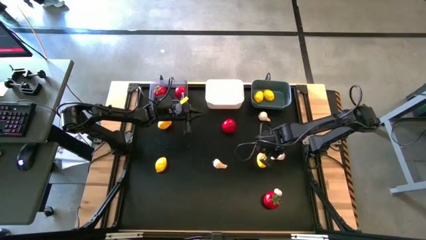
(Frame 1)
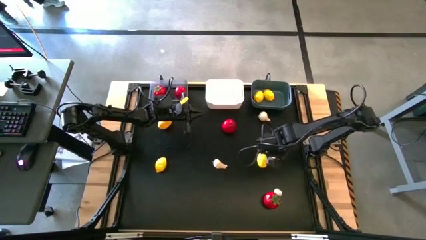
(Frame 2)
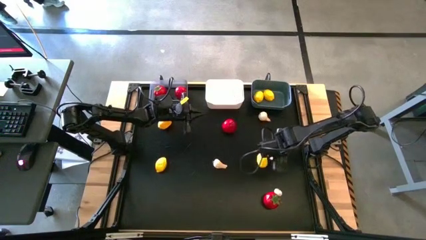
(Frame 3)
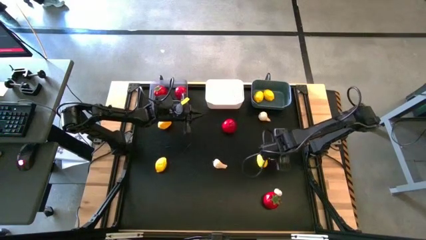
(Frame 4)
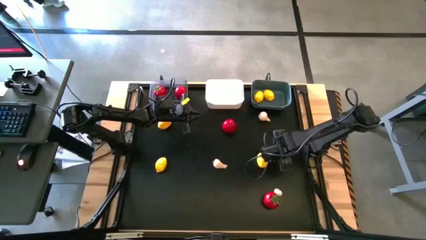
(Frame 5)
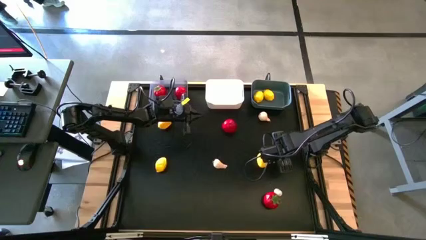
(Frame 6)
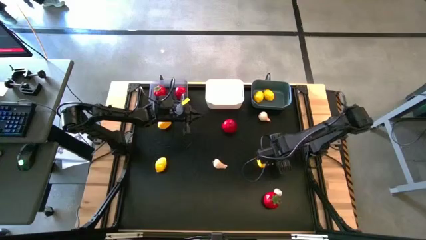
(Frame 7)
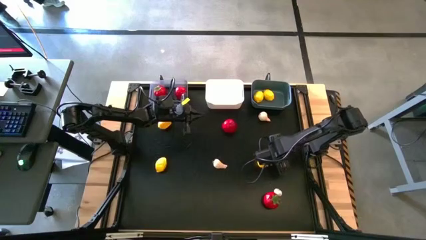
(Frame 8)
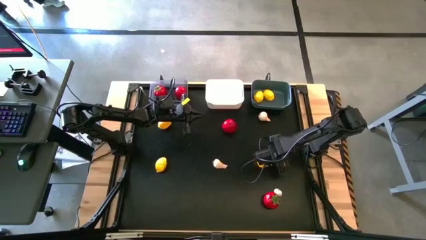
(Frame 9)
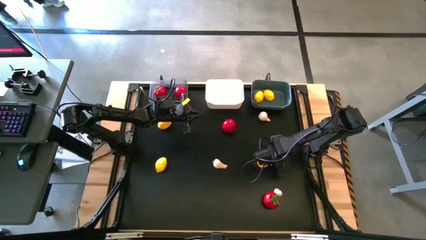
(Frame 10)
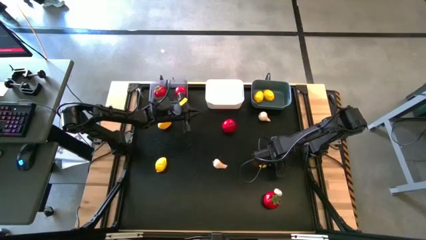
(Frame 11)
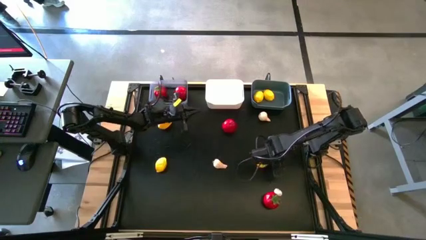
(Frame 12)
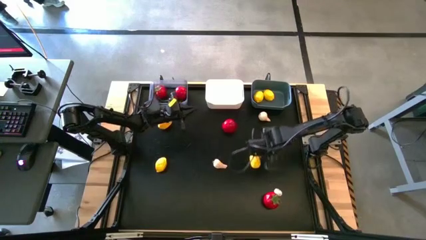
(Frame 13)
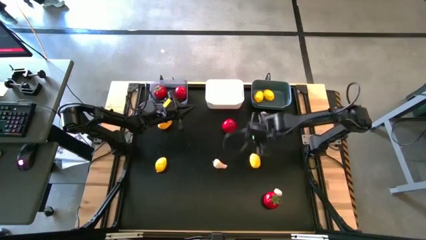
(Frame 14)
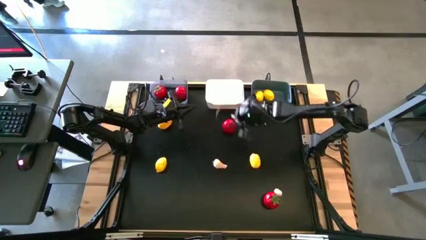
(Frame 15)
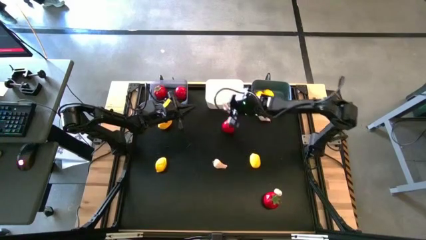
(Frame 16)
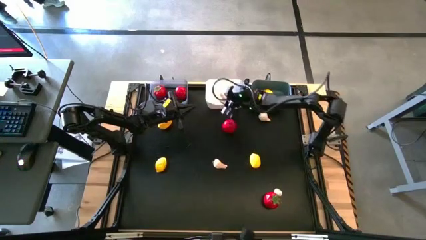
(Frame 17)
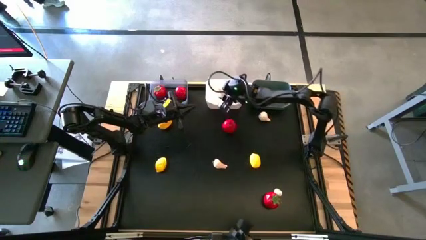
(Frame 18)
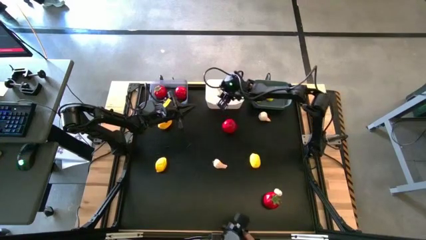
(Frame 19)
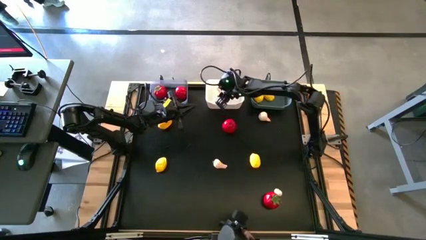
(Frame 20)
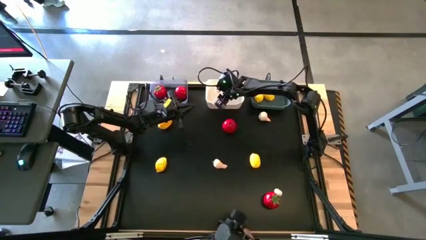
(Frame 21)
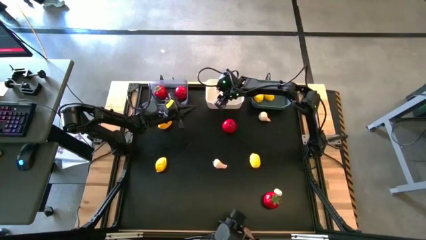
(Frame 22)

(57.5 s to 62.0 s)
Task: Sort produce into baskets
Put the garlic into the white bin

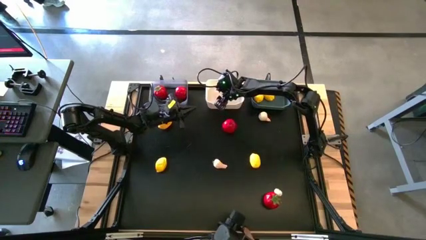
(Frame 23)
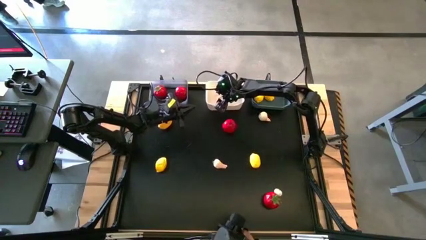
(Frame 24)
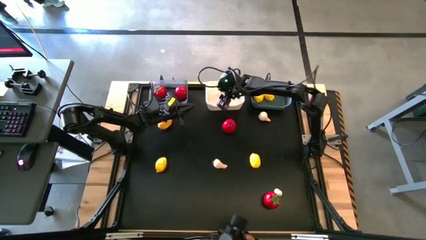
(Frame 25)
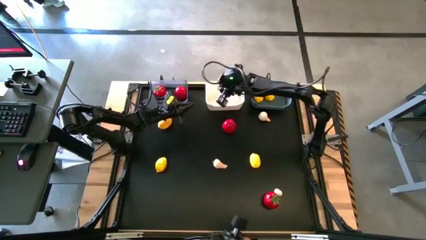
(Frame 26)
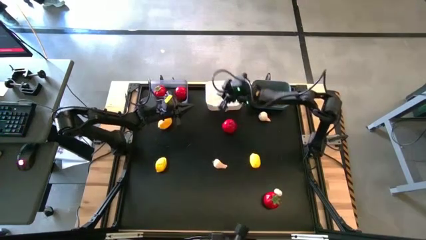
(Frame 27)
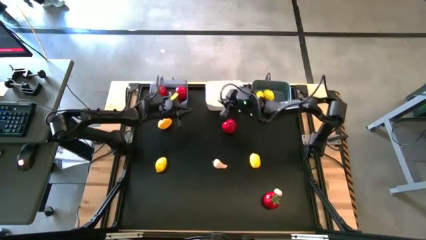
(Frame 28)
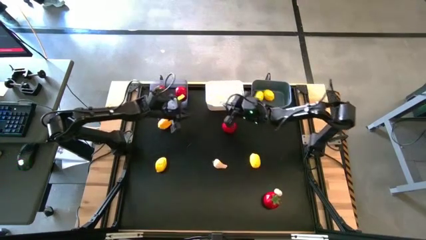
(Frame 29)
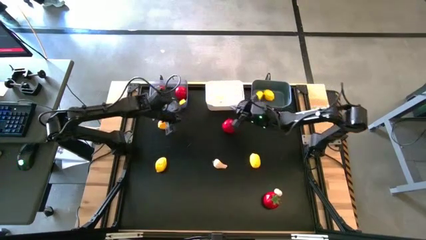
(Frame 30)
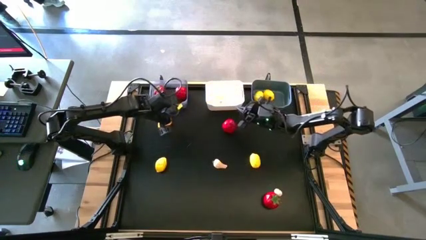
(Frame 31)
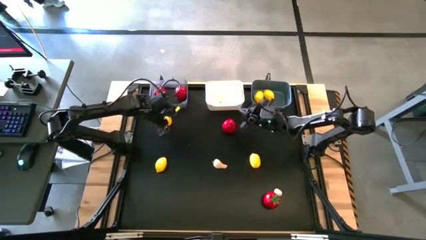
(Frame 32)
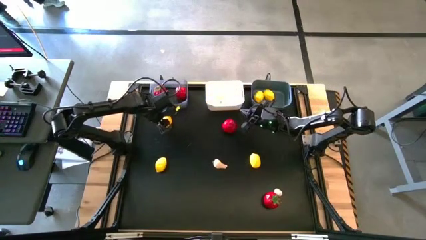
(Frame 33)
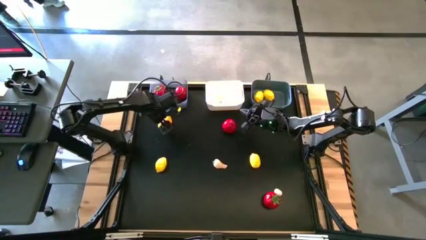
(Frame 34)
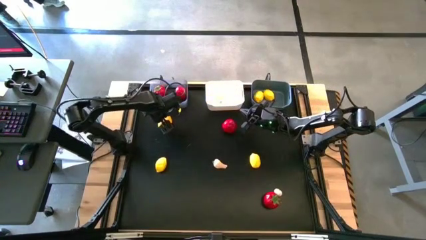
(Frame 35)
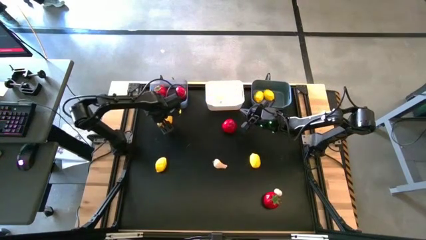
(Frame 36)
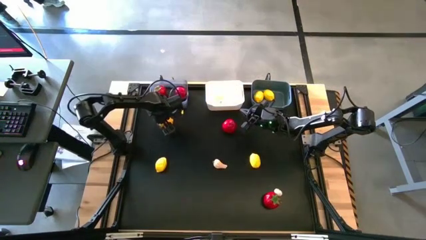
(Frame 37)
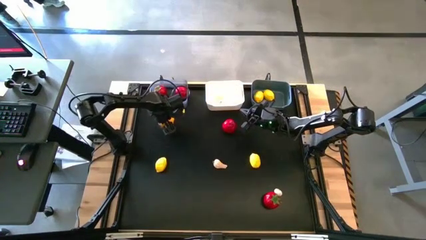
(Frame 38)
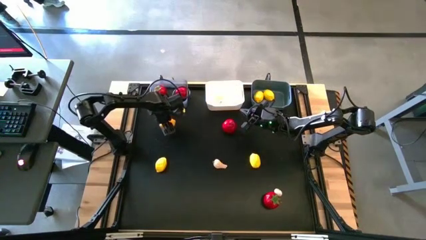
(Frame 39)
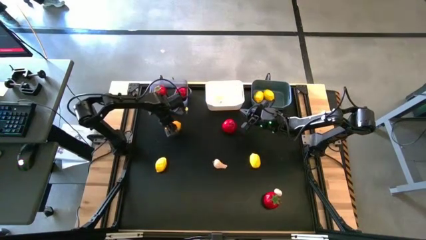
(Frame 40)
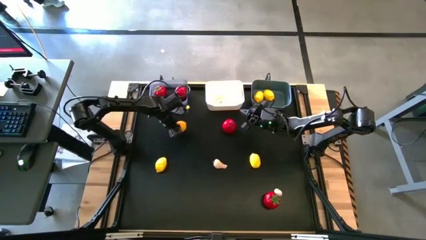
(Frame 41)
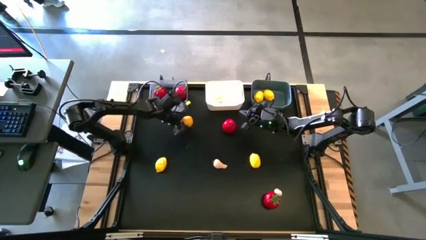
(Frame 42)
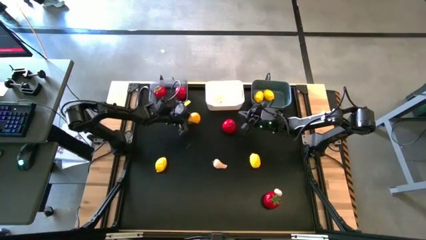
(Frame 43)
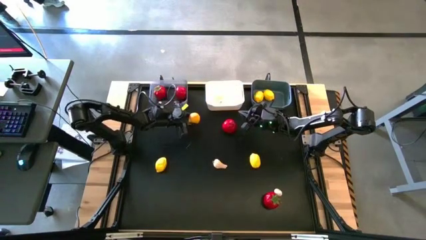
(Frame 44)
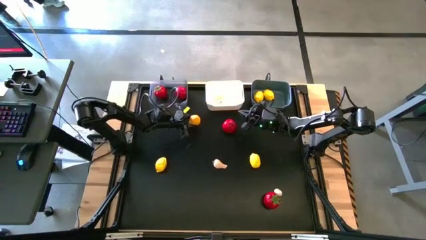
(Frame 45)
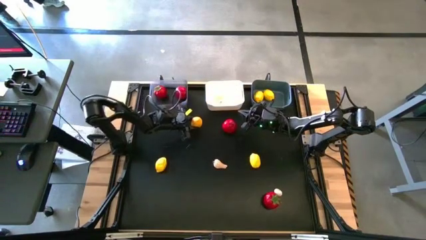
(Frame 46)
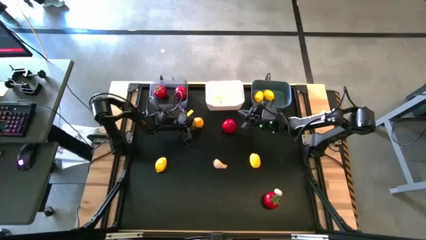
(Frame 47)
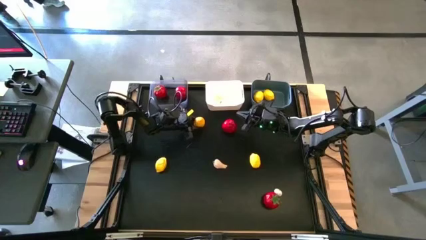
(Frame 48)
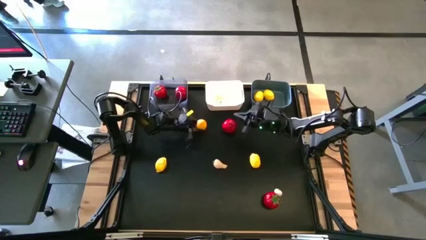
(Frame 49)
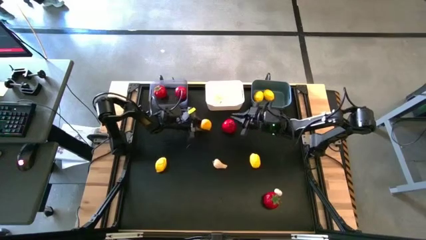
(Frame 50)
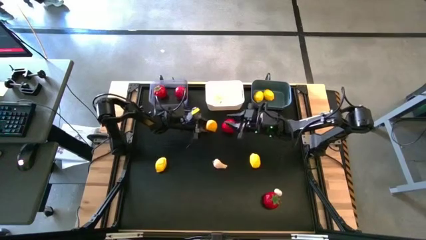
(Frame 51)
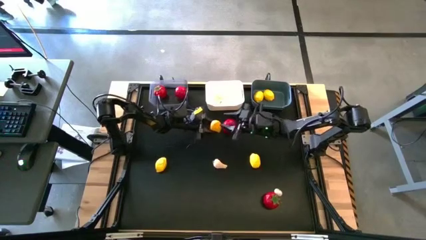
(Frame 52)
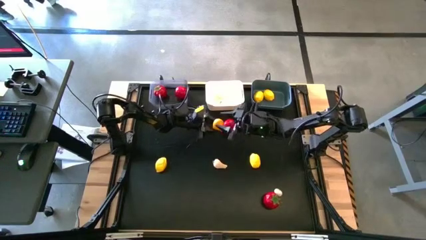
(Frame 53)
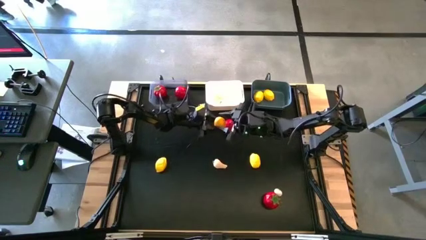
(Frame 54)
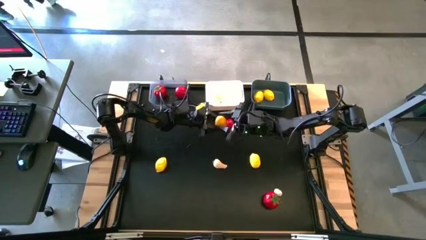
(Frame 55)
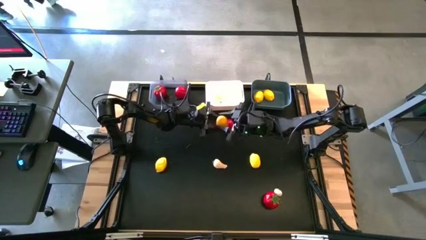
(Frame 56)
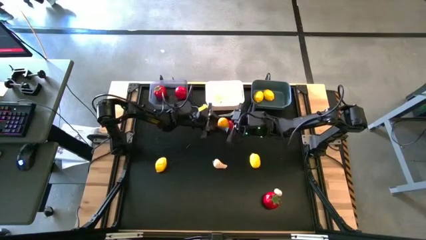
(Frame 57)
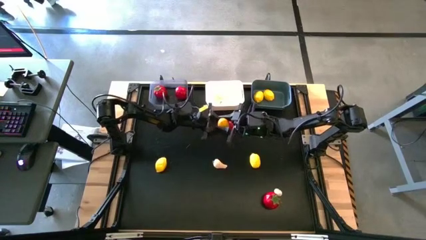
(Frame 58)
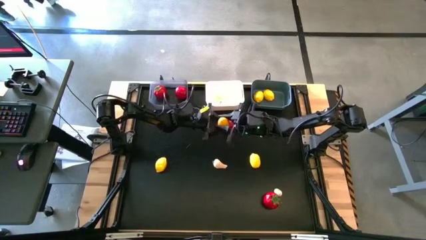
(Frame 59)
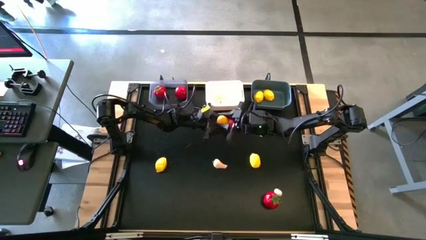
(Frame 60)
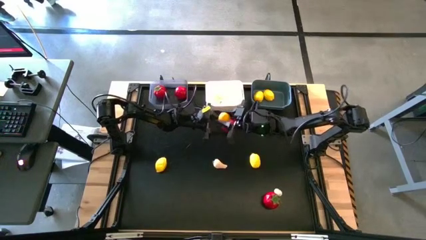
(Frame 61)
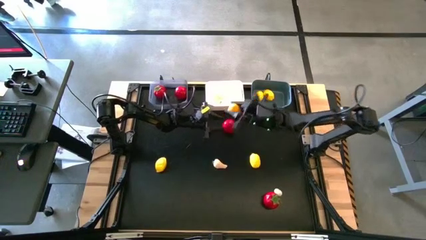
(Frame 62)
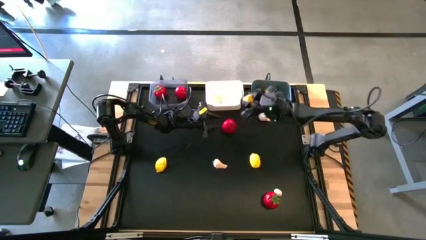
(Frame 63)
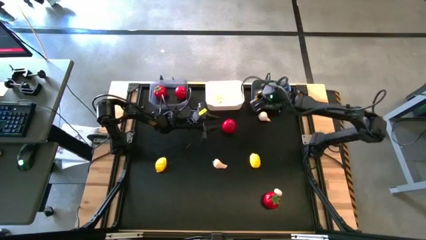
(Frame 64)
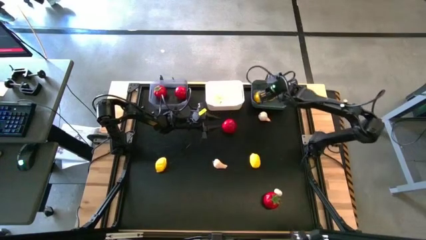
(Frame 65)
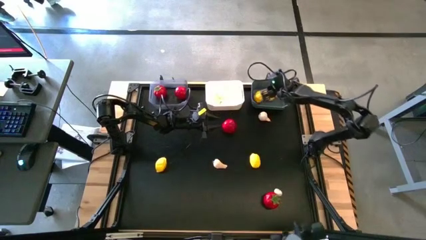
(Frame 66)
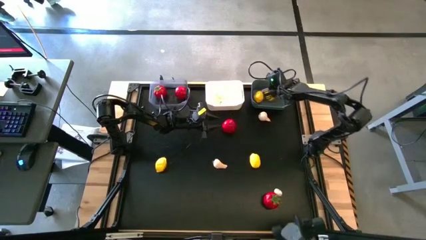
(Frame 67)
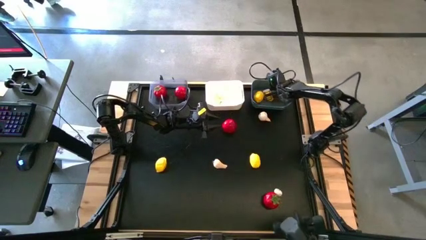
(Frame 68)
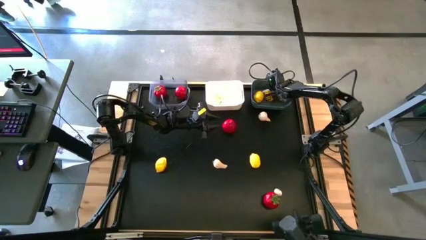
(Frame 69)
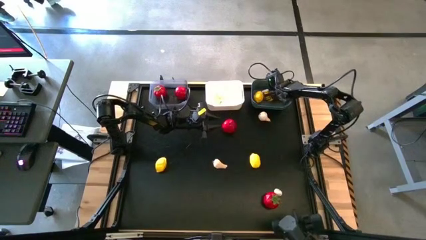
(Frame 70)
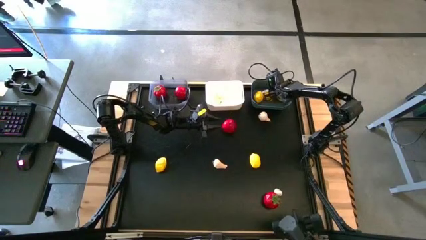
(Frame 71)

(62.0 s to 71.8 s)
Put the lemon into the blue bin

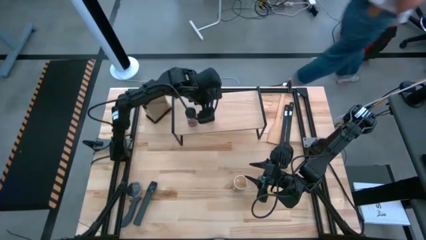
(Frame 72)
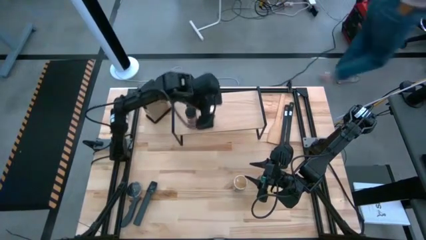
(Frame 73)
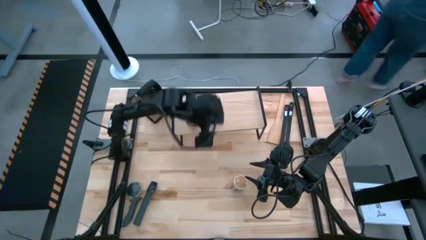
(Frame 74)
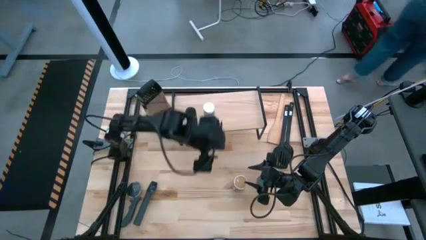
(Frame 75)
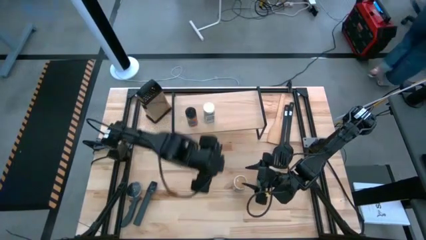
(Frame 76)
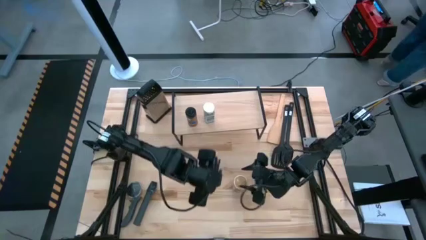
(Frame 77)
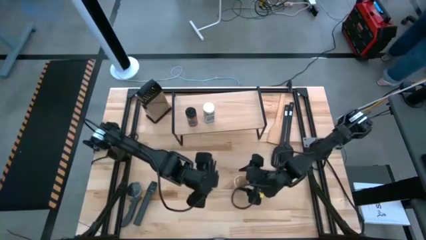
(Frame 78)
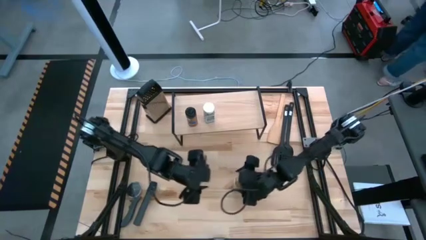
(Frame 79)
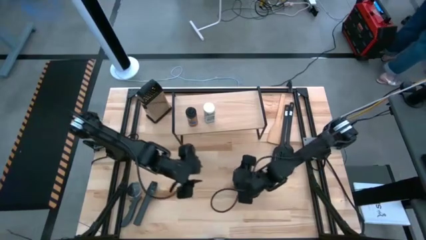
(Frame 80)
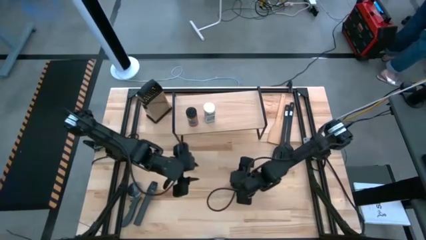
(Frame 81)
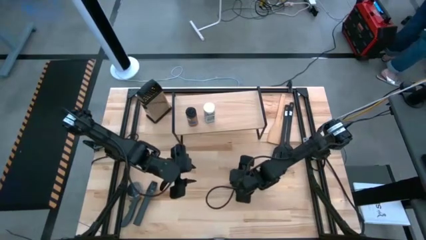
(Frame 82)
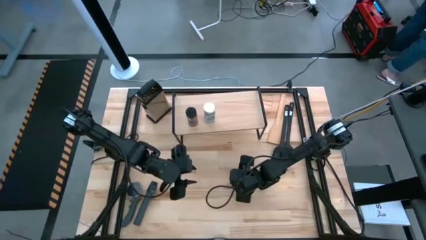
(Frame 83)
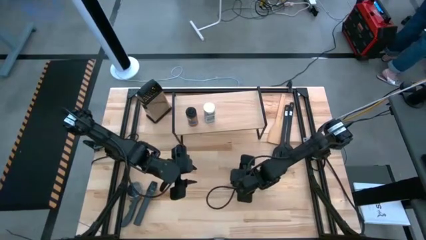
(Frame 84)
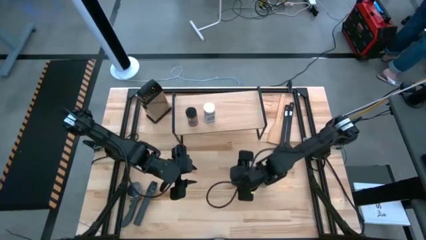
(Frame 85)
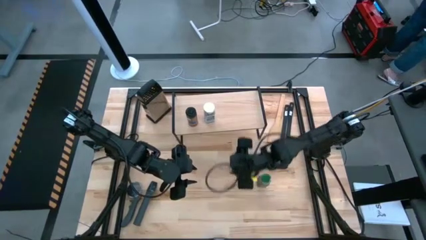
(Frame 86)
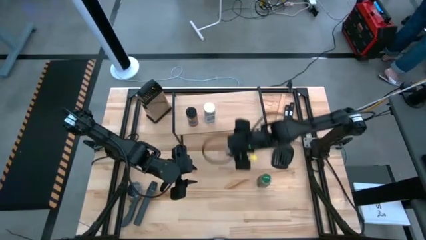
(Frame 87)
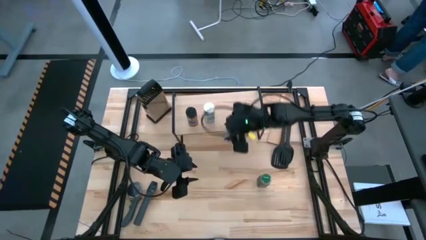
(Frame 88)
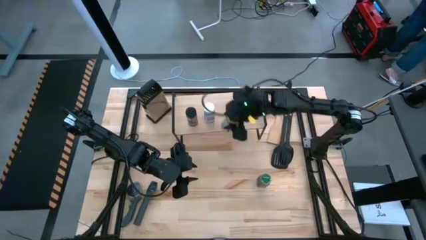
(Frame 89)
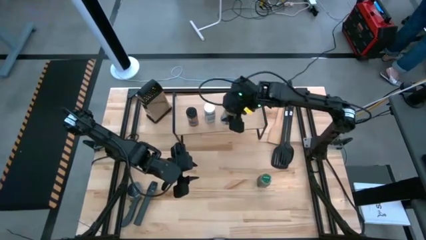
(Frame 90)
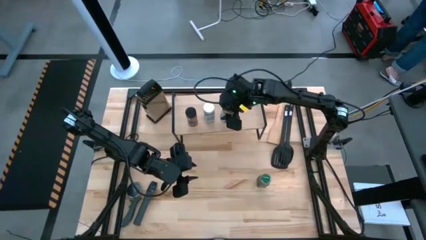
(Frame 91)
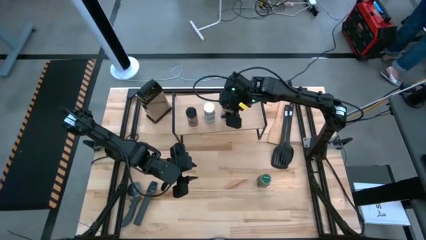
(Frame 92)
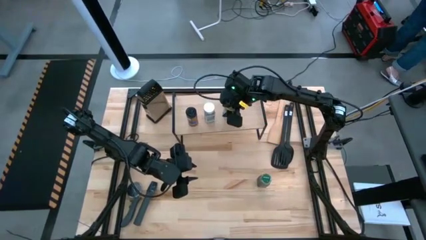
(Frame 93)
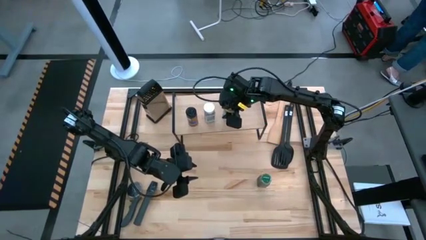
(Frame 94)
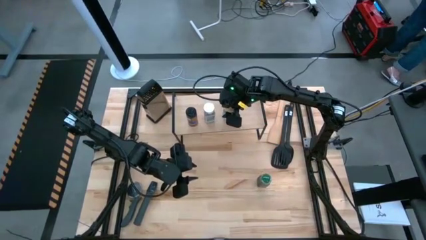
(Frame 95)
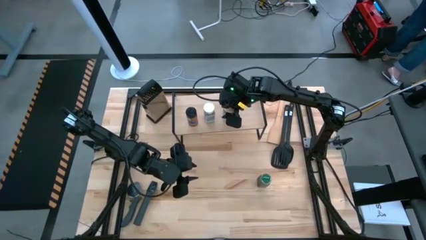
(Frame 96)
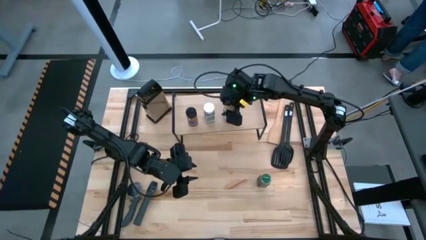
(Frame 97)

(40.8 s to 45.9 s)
Task: Shelf spices
Put the golden seasoning bottle on the shelf aligned with the other white seasoning bottle
